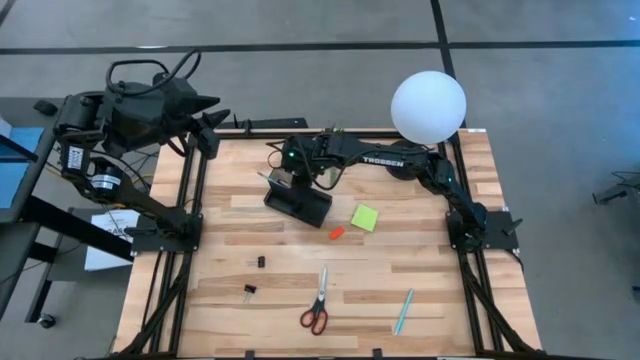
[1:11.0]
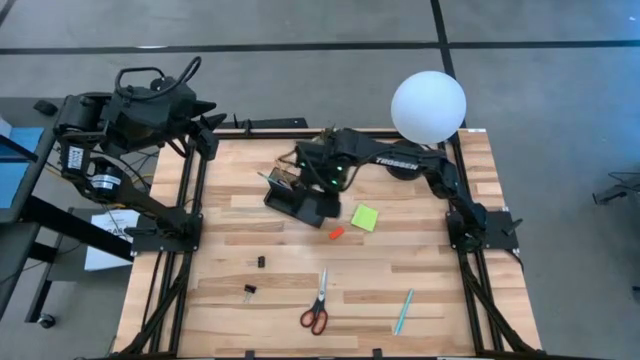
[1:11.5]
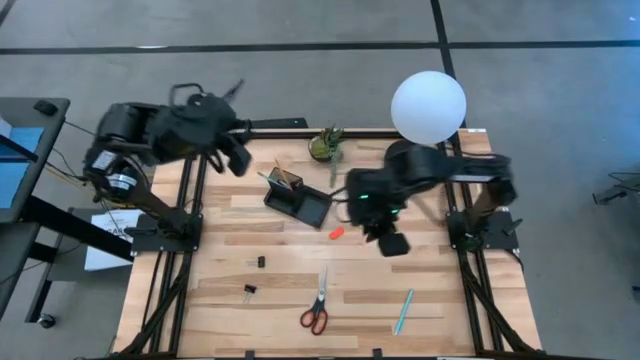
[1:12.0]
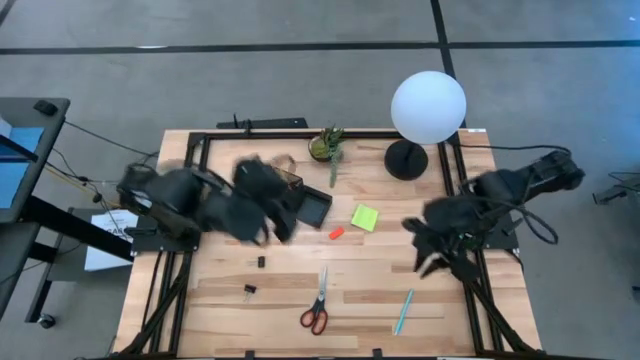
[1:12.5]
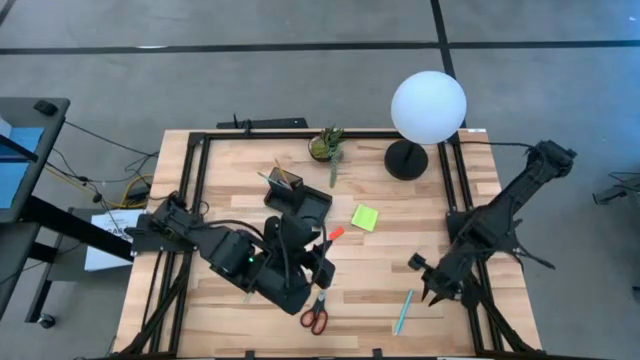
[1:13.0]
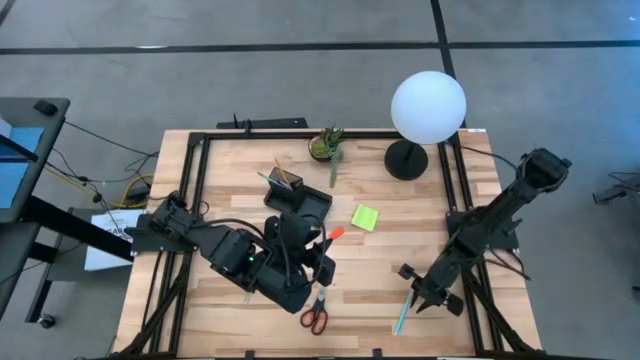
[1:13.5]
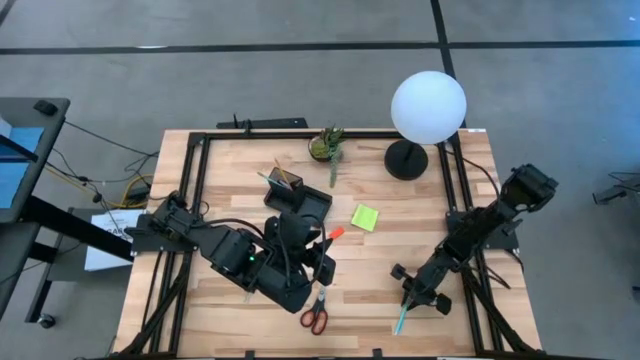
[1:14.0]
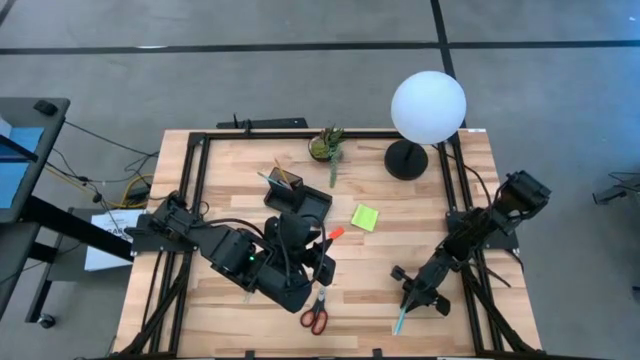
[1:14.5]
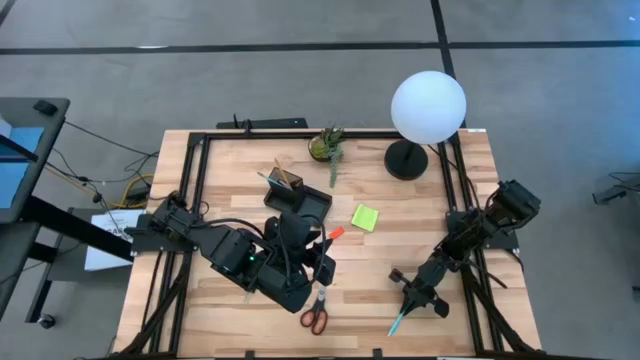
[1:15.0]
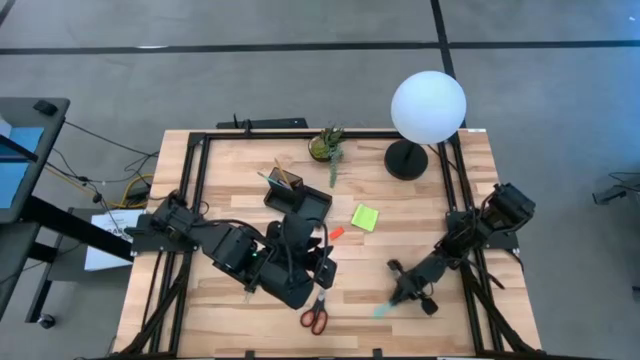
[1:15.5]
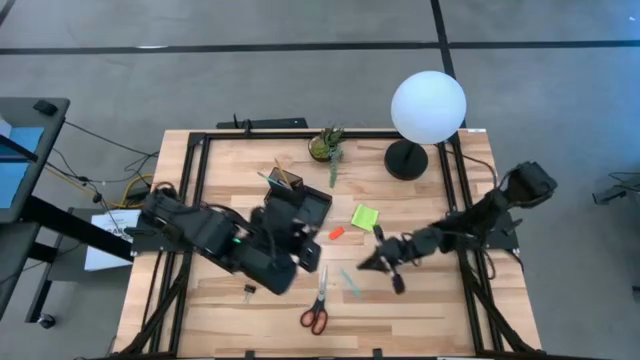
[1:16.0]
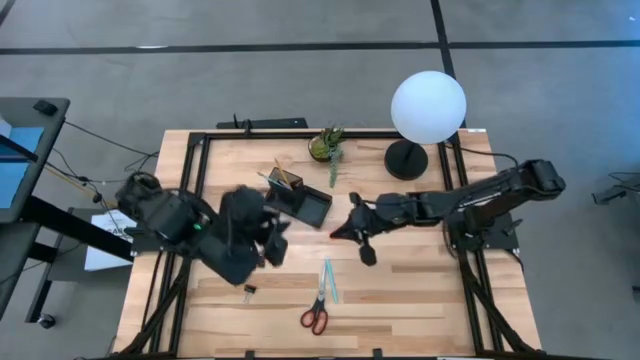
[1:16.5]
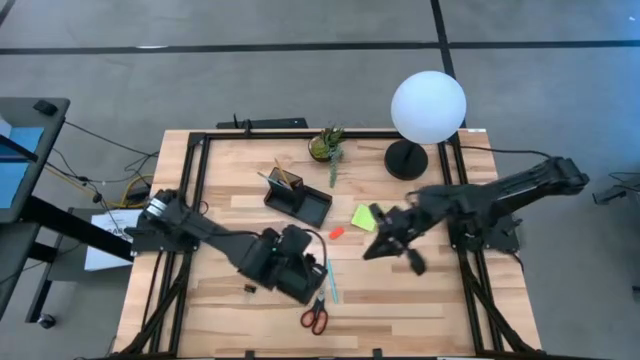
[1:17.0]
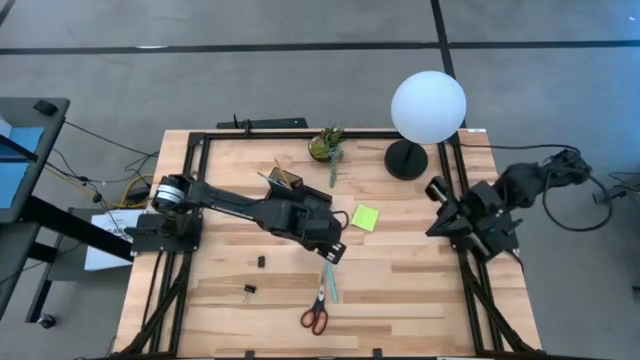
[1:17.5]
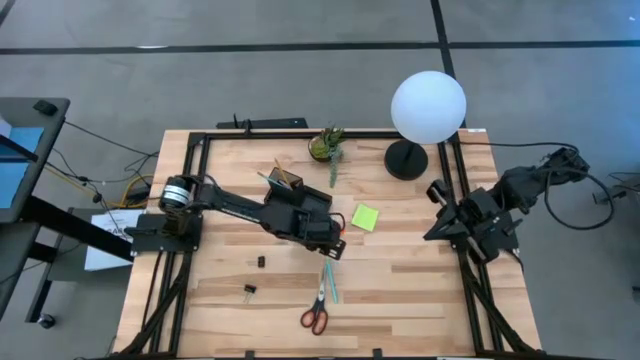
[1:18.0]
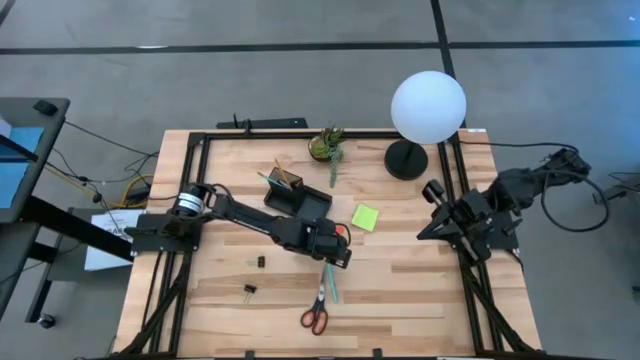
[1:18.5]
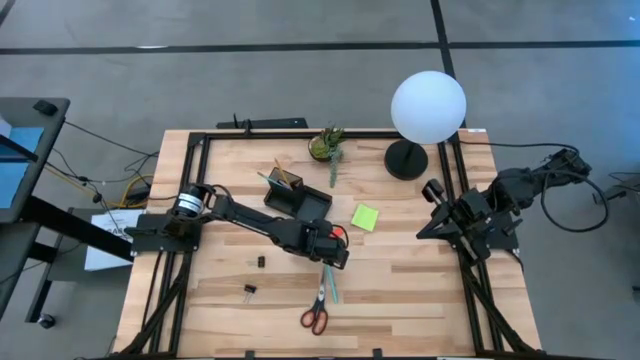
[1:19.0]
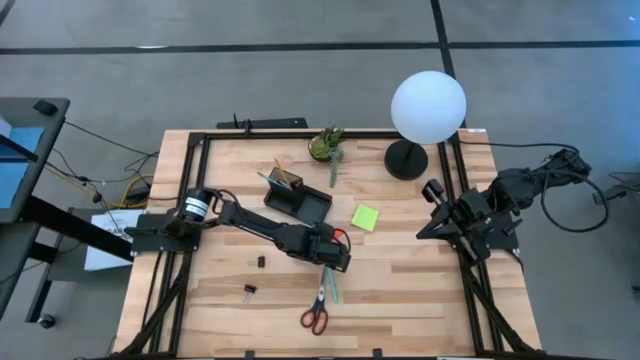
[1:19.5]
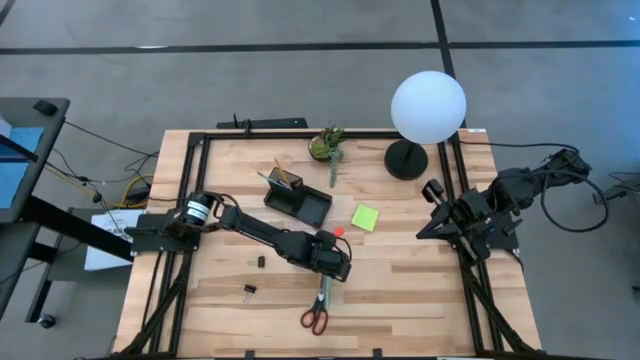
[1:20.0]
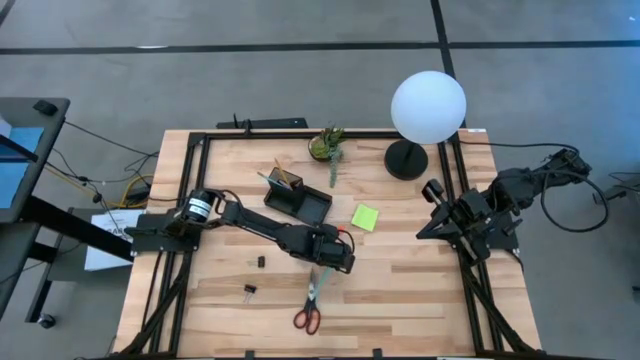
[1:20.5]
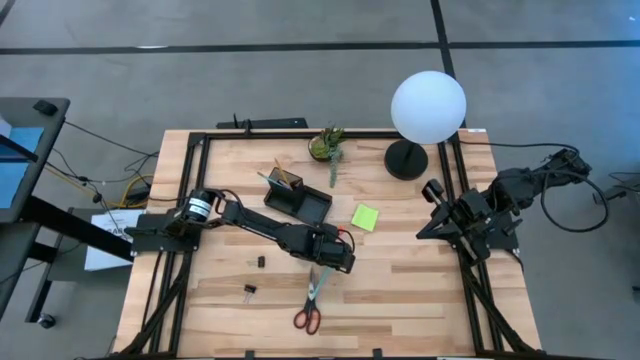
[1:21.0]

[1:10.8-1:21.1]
Task: Pick and place office supplies into organizer
Put the blue pen into the black desk organizer

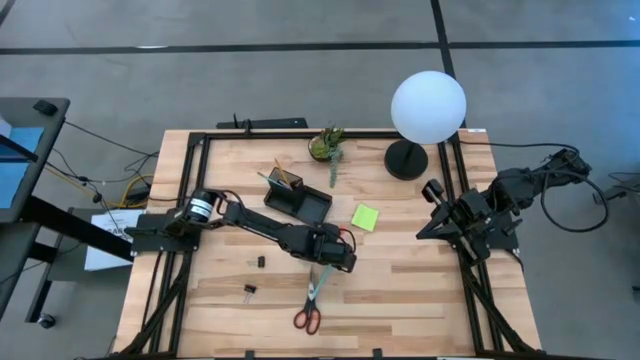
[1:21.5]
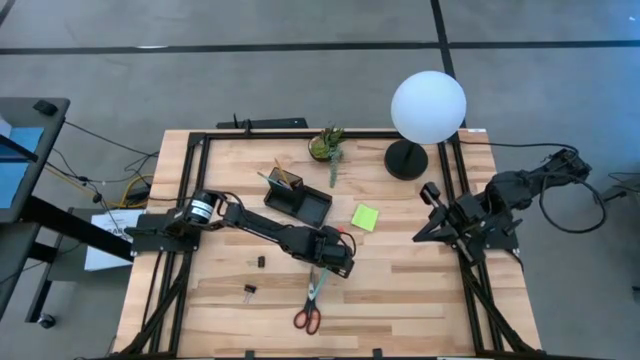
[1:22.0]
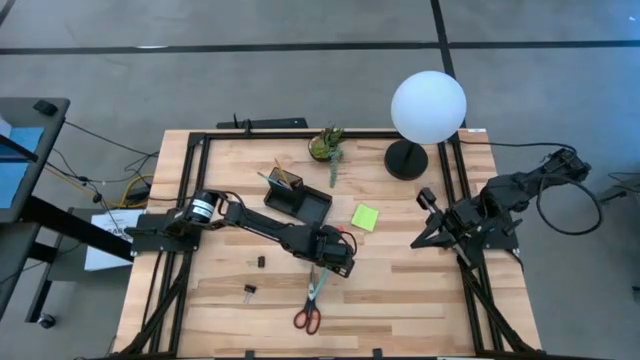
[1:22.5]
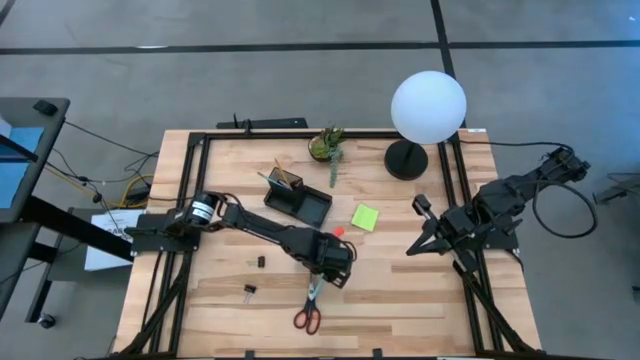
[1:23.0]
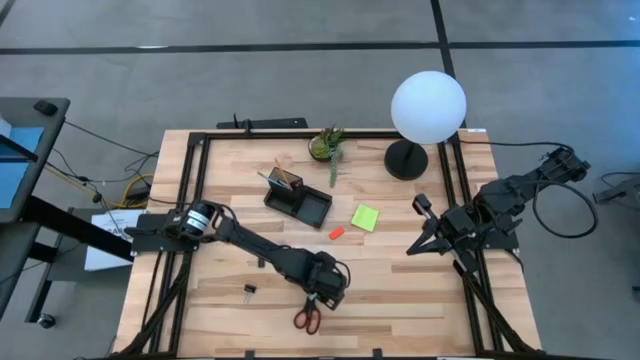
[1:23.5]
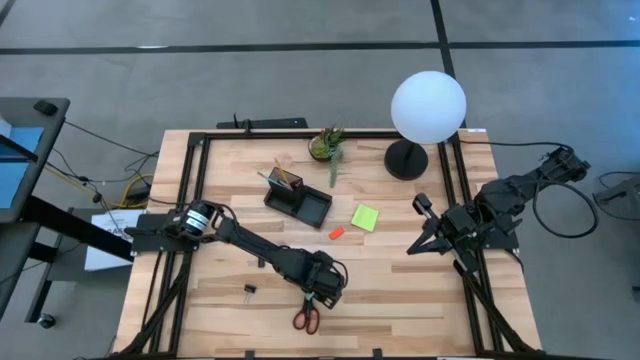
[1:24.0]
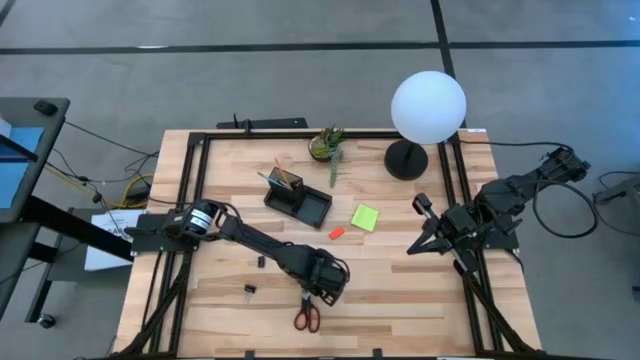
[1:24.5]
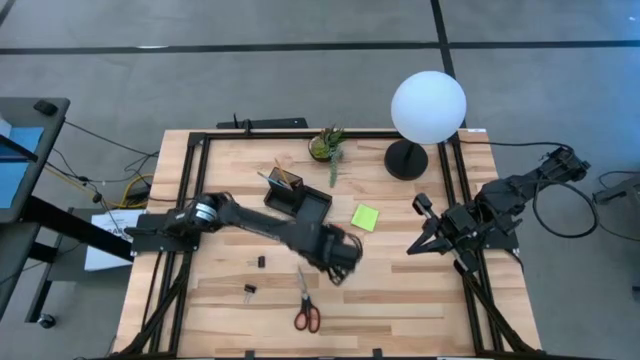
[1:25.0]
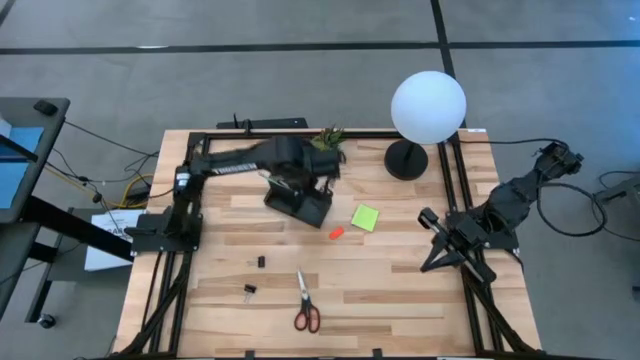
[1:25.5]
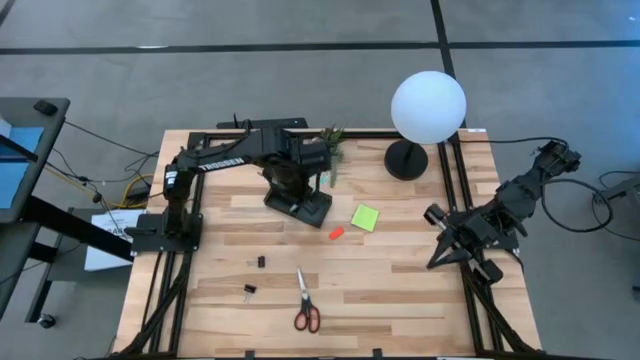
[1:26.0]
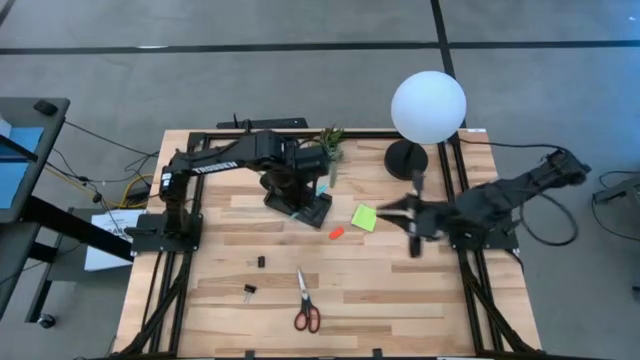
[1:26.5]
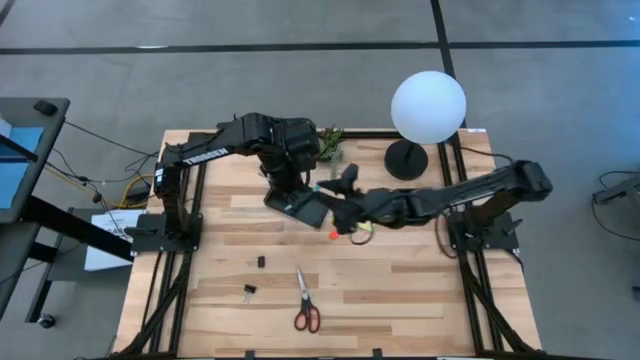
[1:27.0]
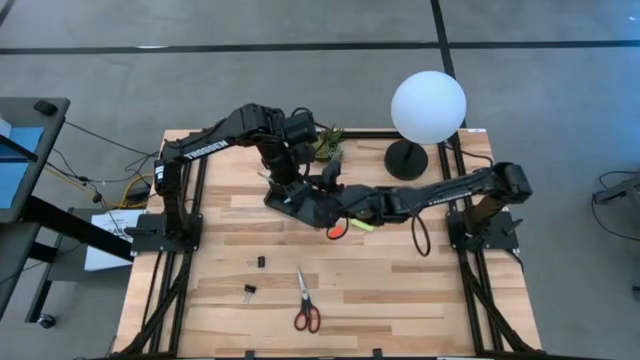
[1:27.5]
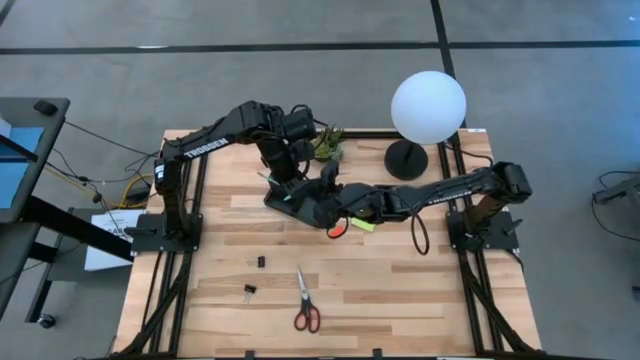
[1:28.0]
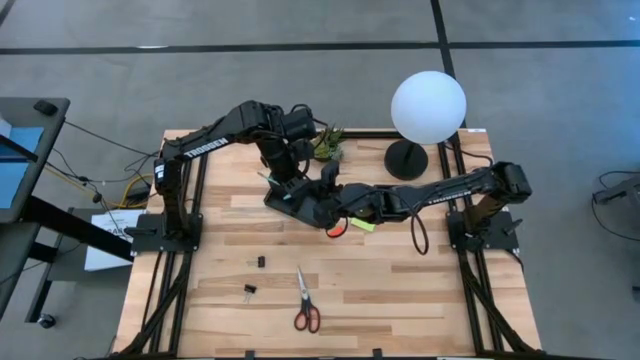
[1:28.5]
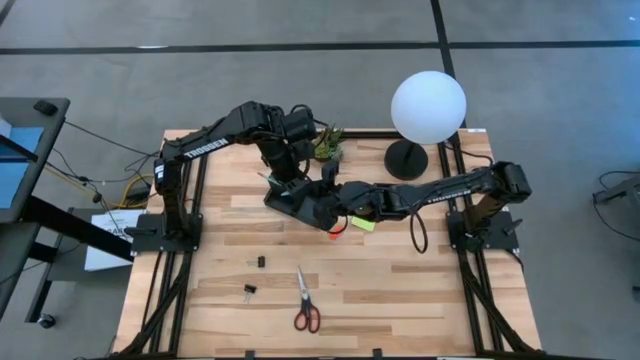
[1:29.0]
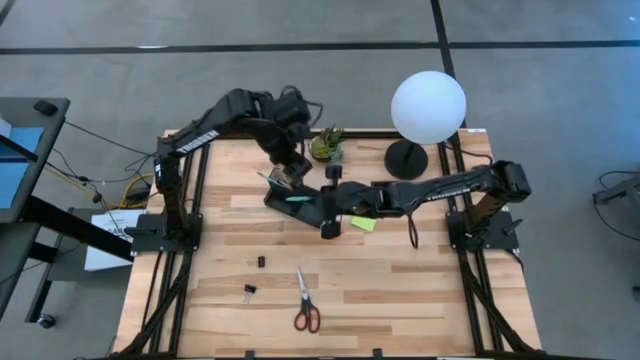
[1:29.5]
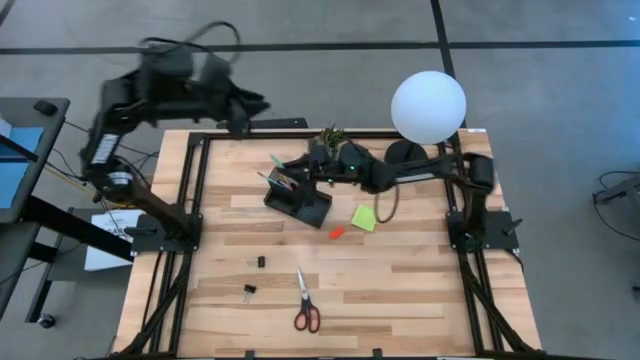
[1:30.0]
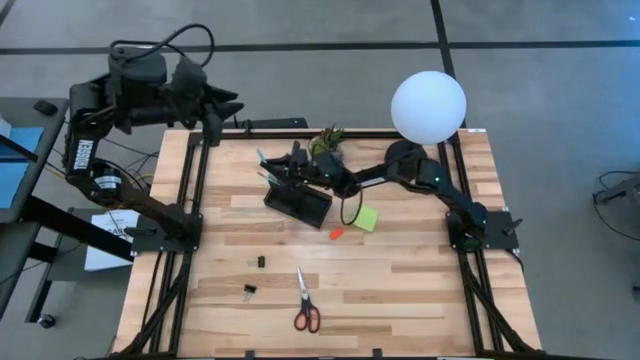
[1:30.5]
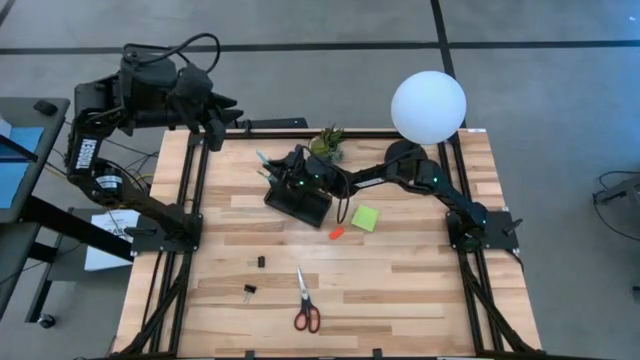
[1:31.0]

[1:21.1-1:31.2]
Put the blue pen into the black desk organizer
